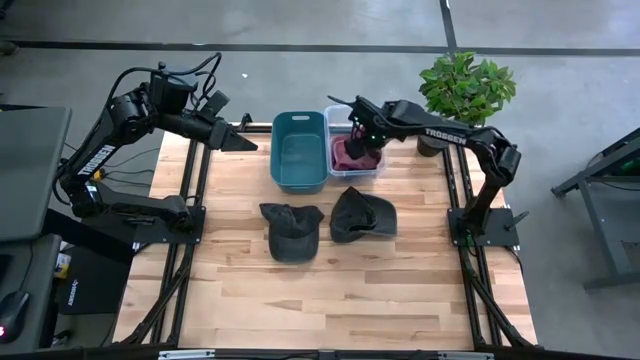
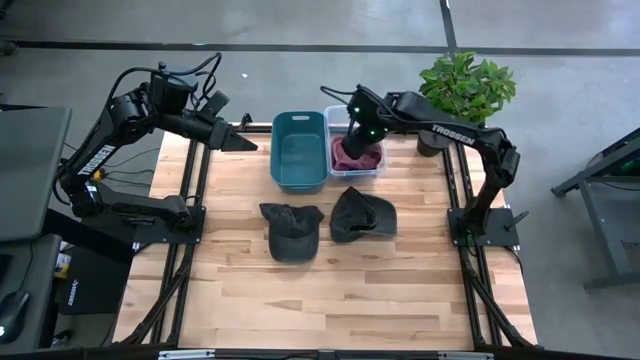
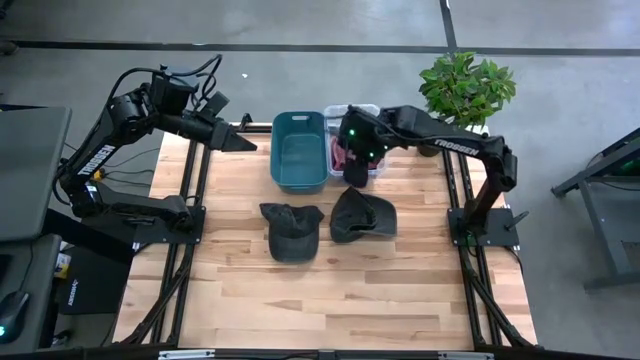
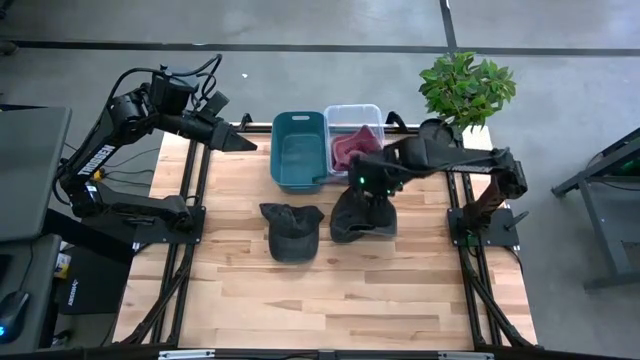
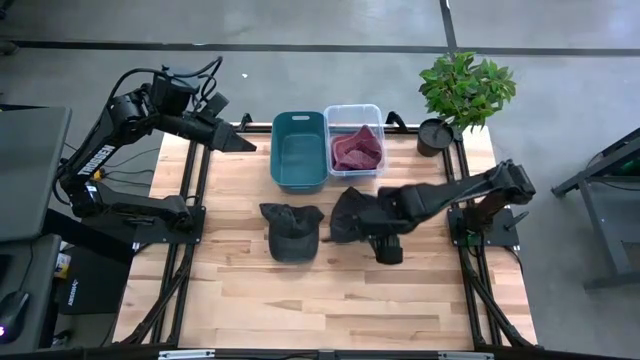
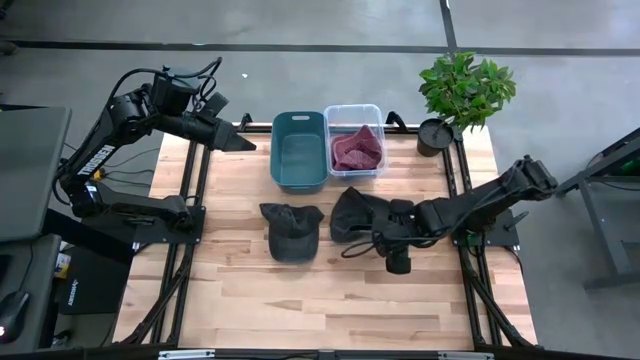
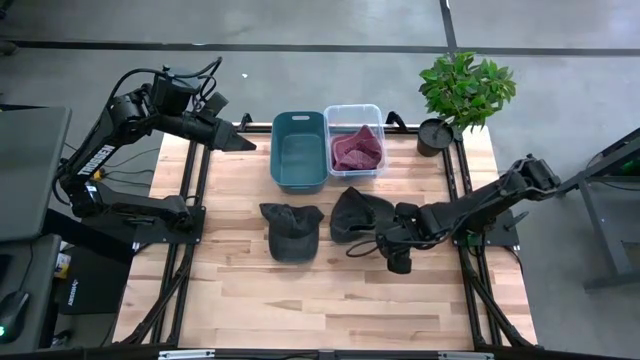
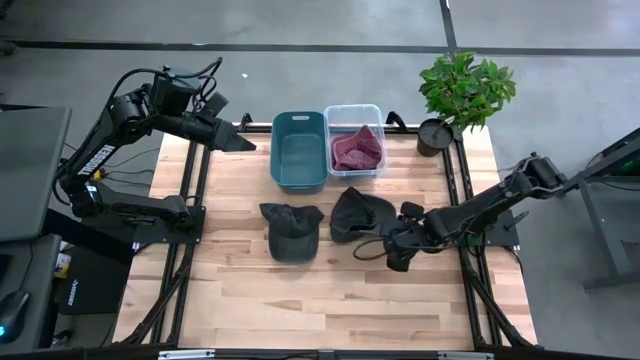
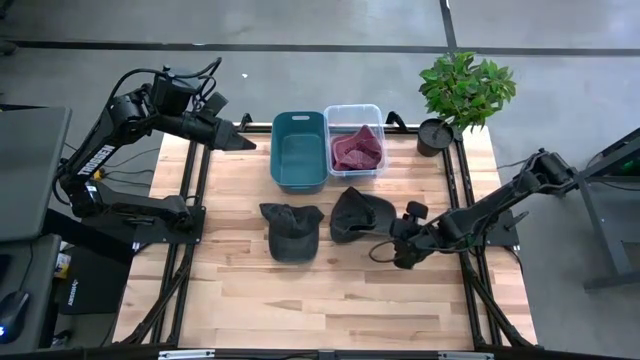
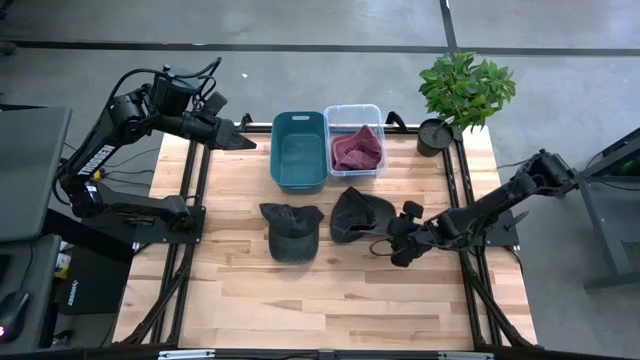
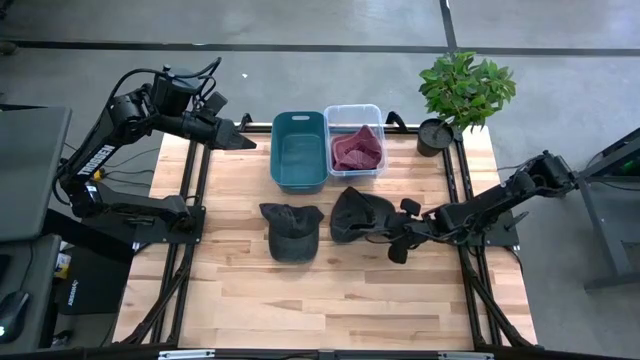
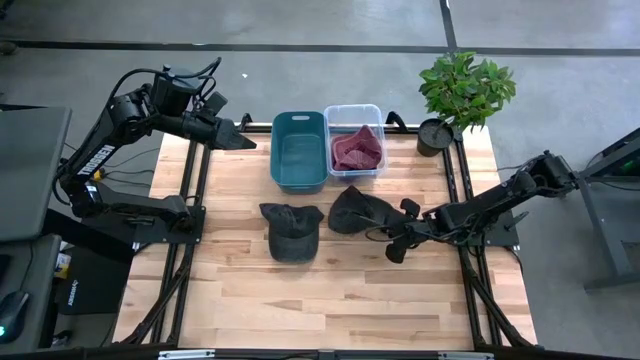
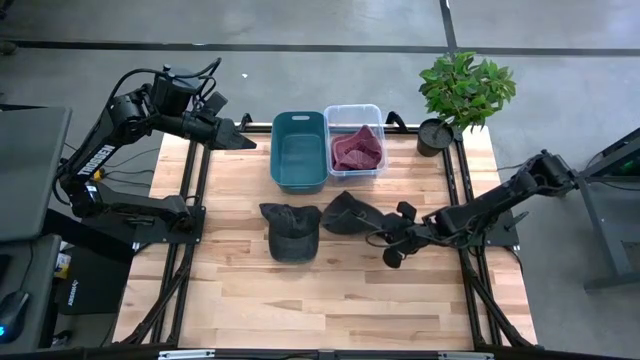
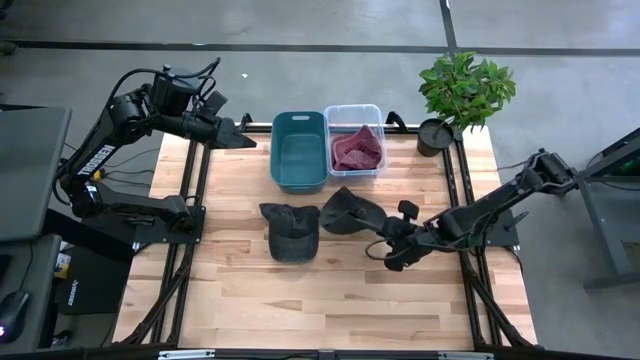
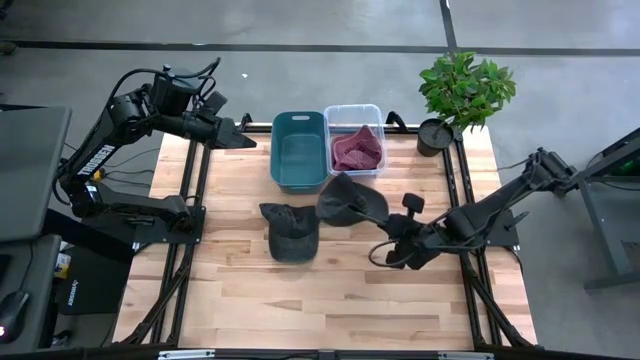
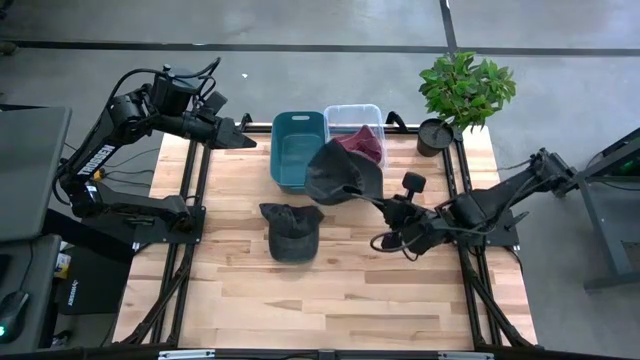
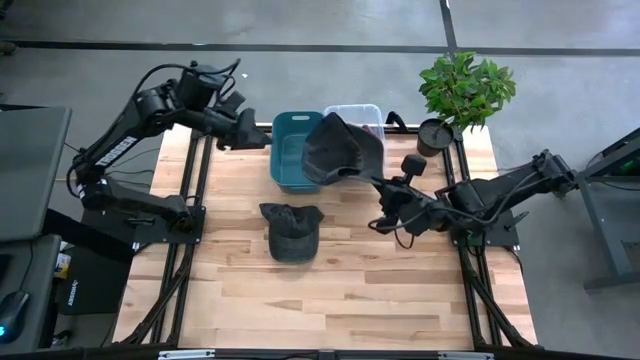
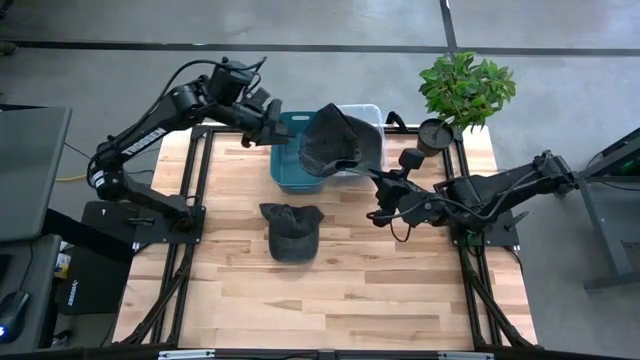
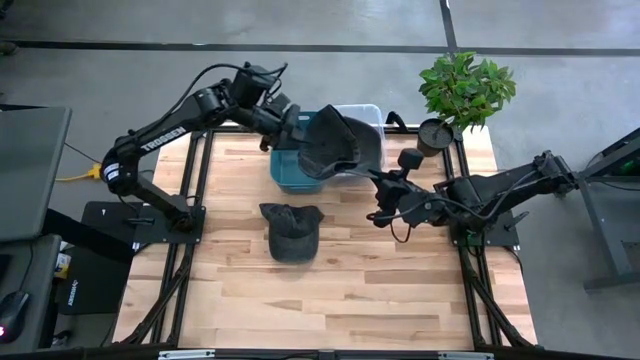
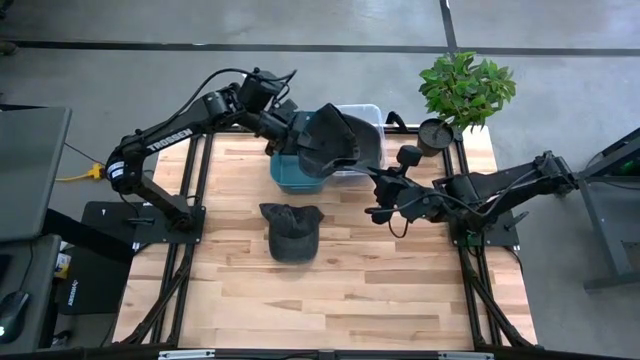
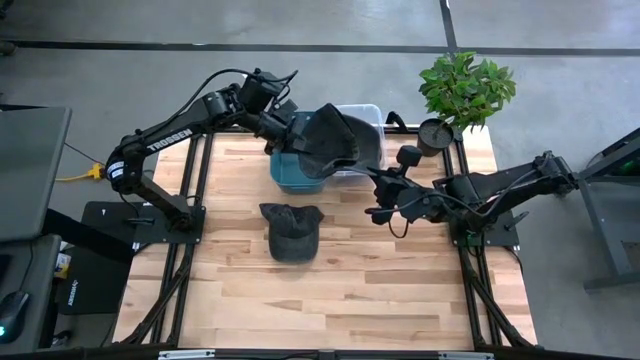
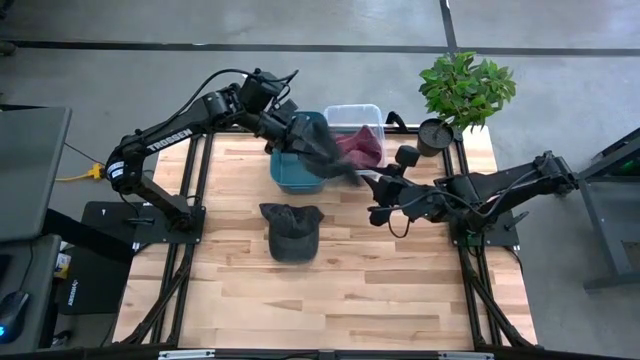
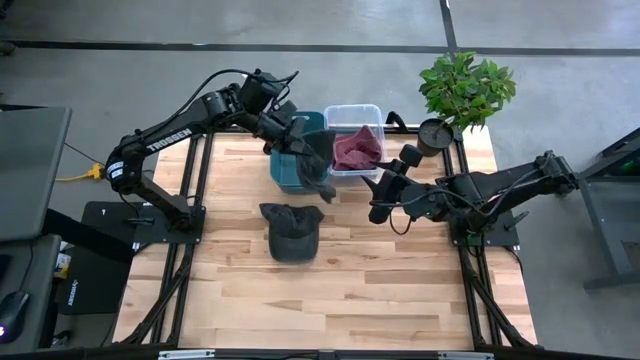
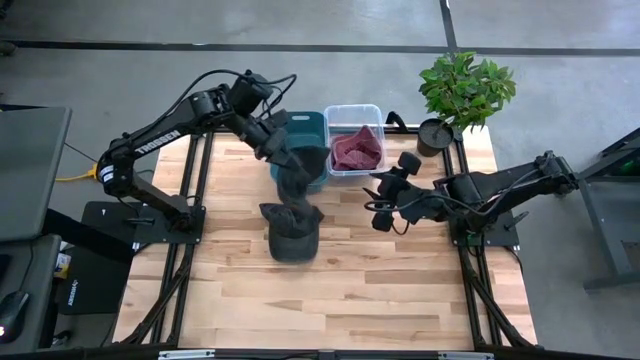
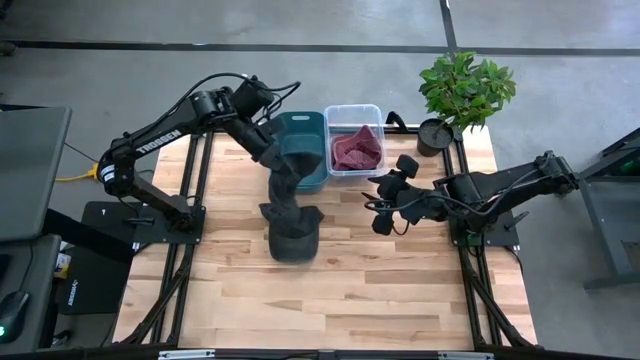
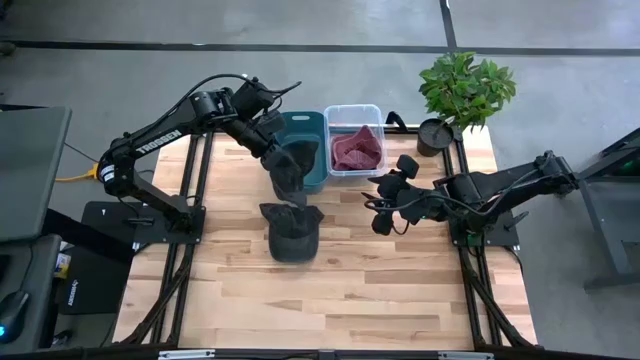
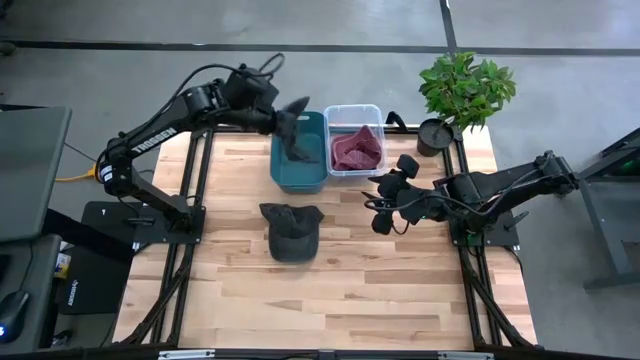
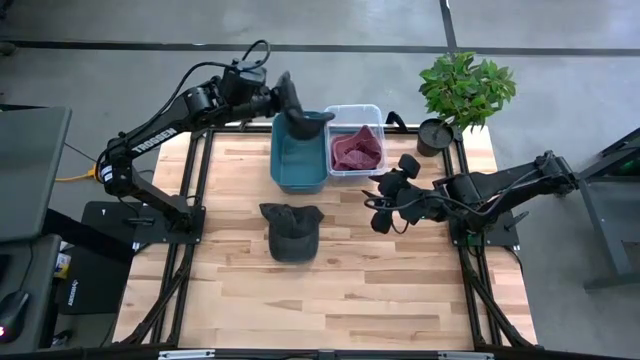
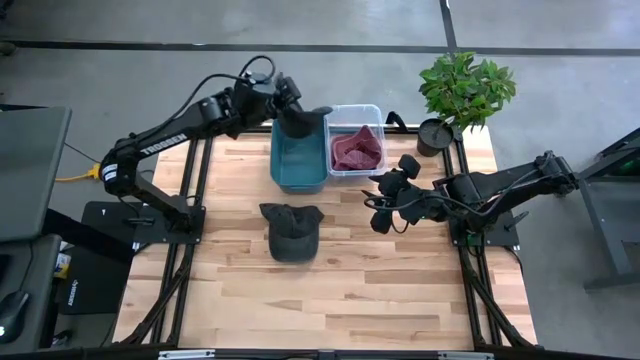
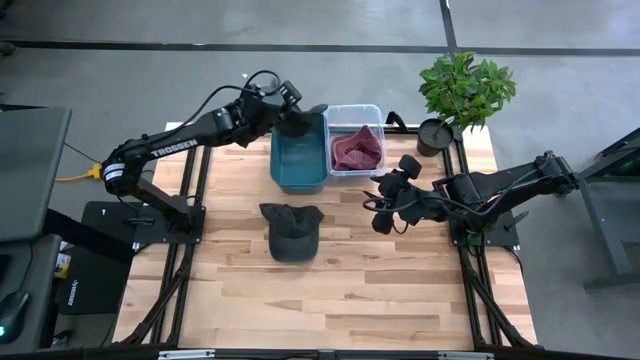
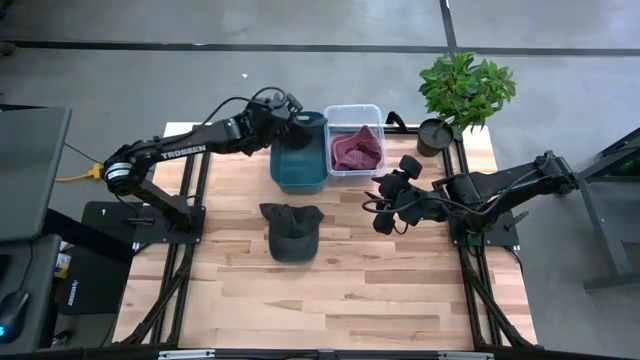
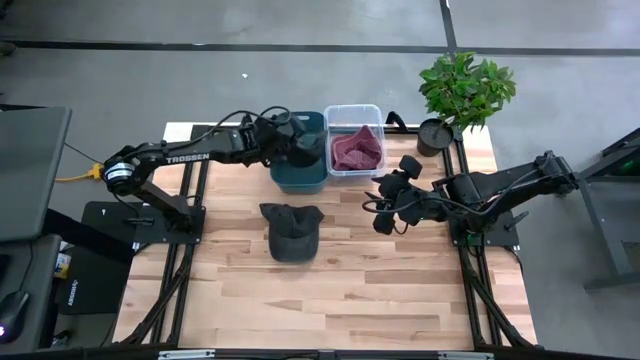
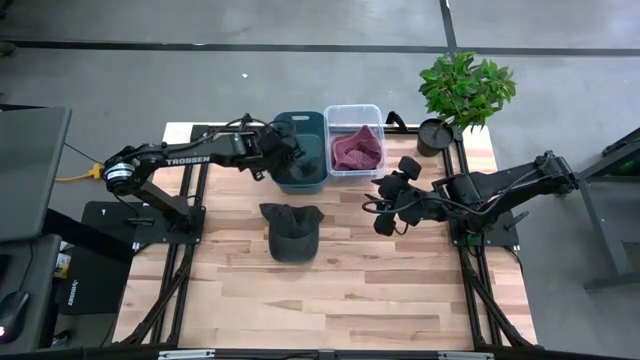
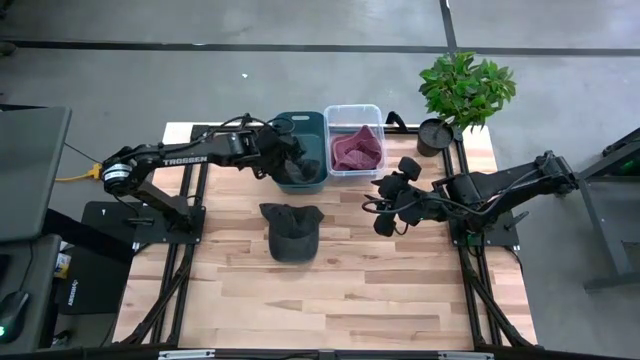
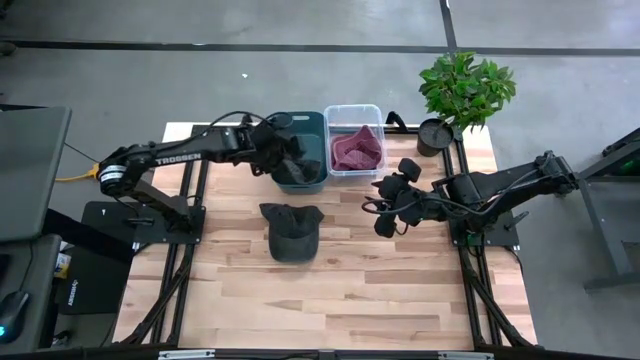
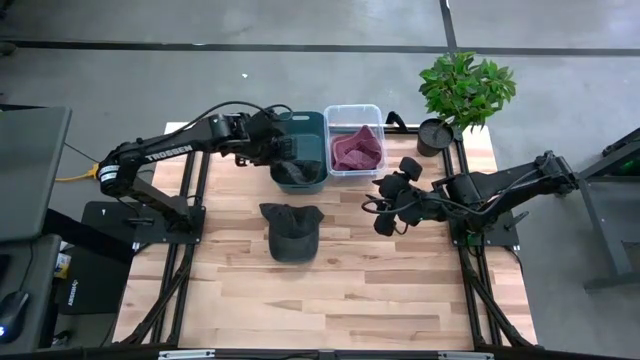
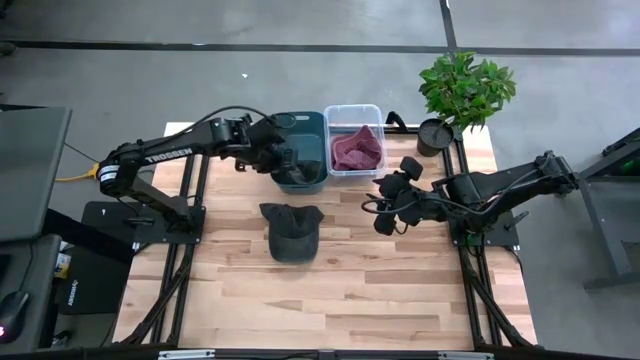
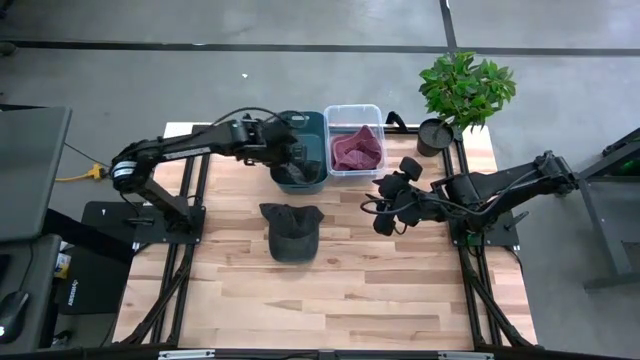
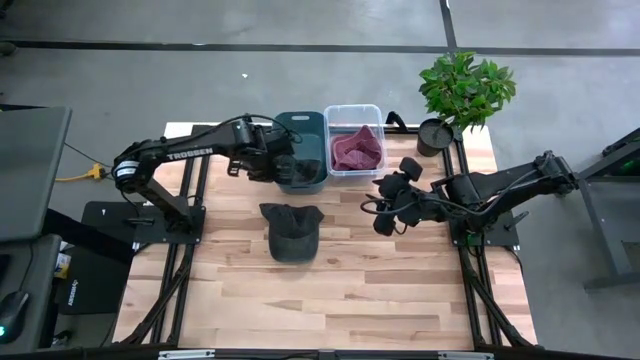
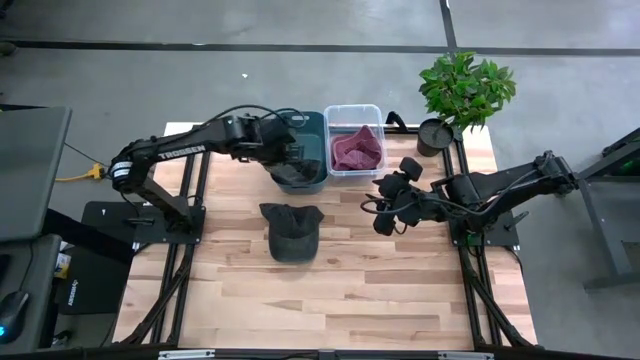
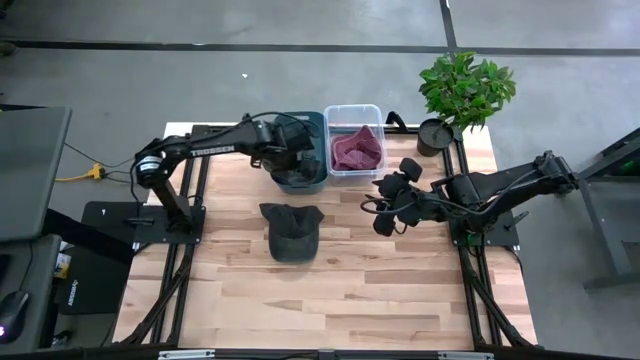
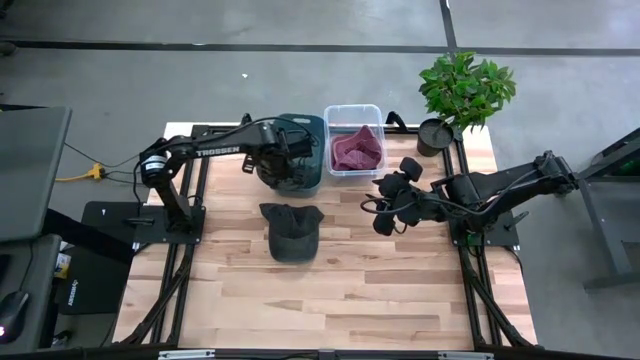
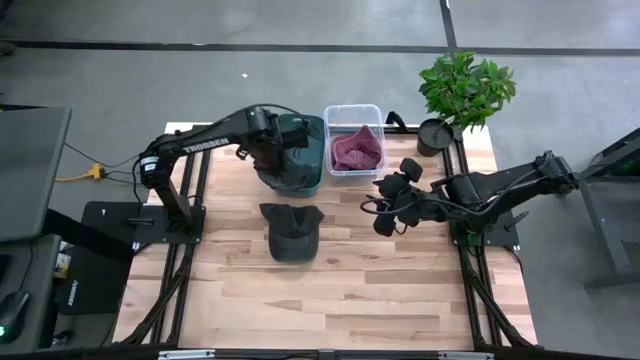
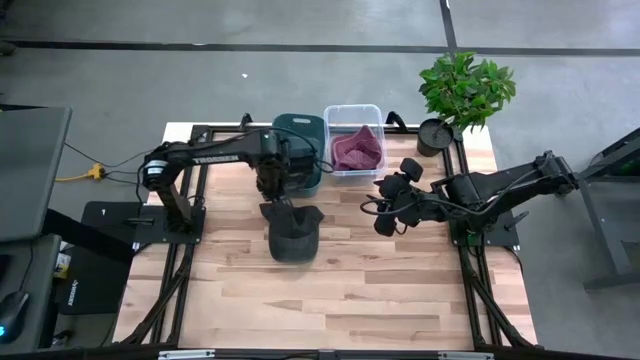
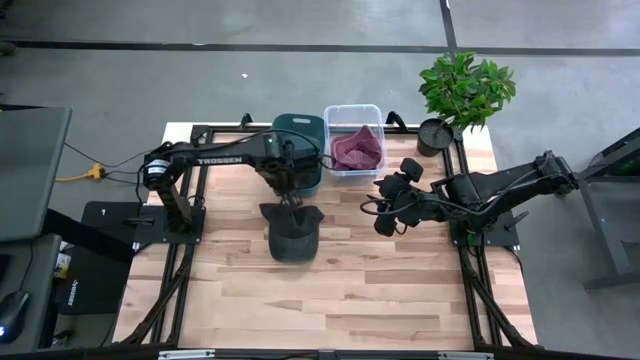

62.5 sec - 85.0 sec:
Task: Pick & Place hat
Put the right black cap into the blue bin
